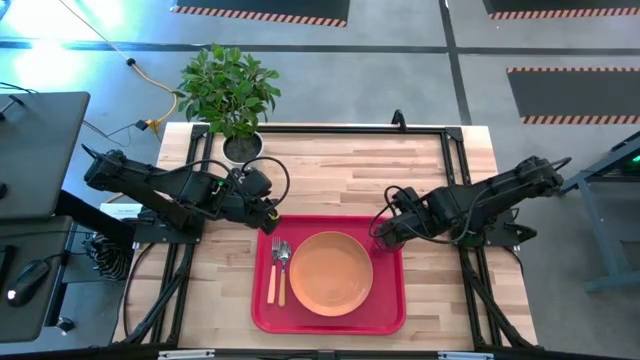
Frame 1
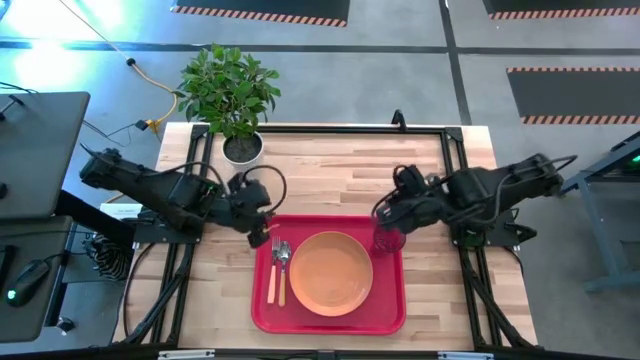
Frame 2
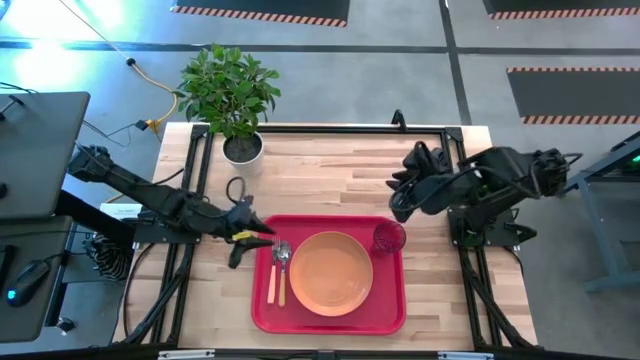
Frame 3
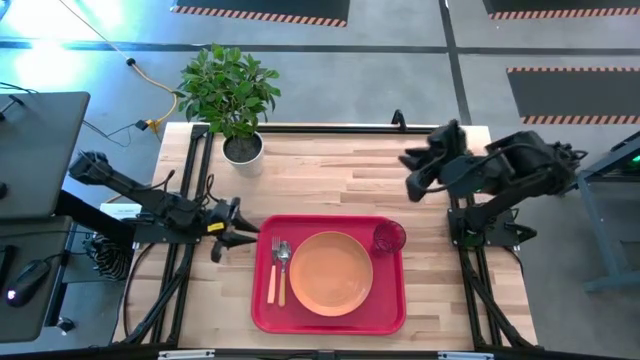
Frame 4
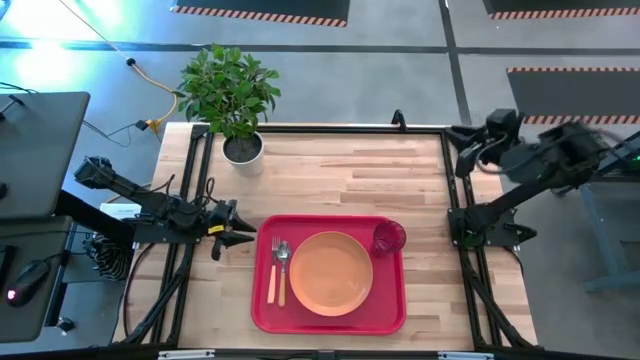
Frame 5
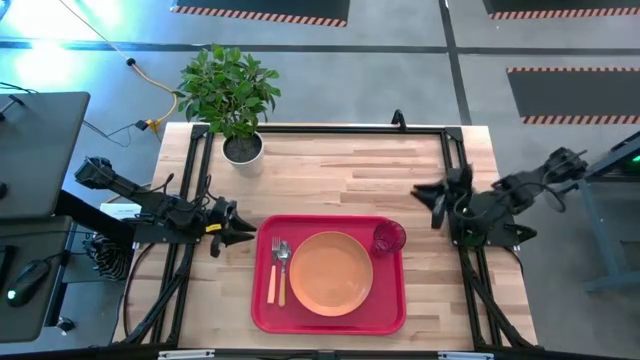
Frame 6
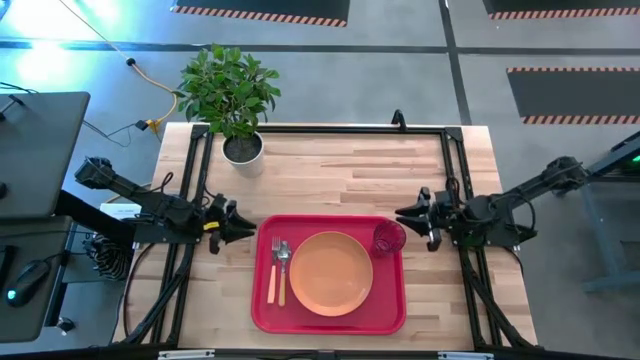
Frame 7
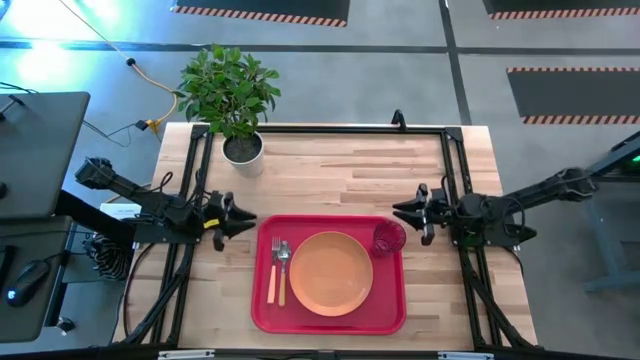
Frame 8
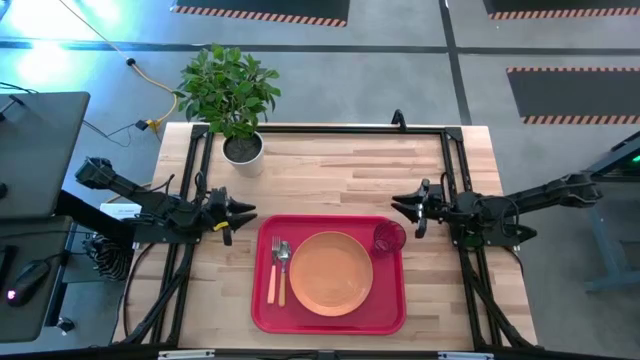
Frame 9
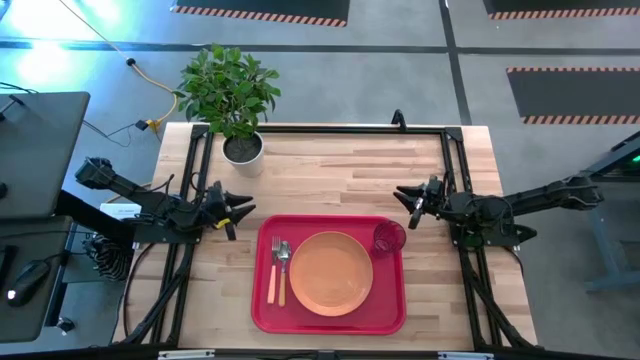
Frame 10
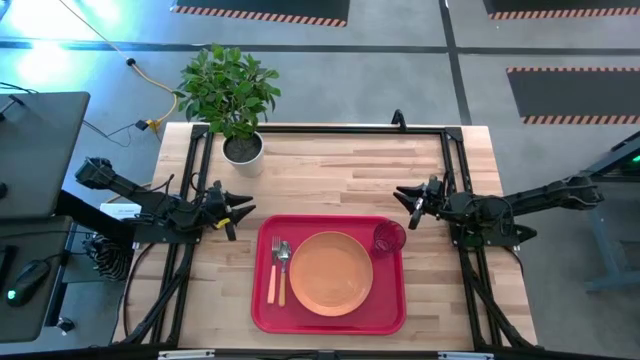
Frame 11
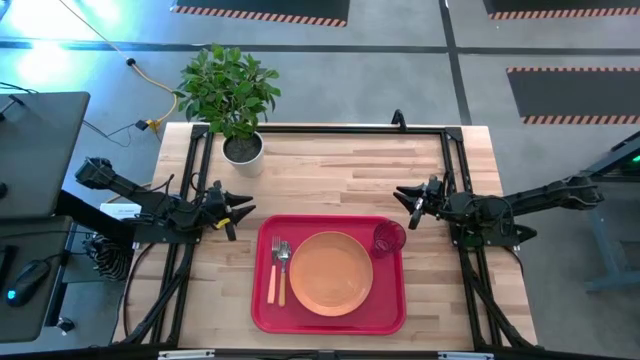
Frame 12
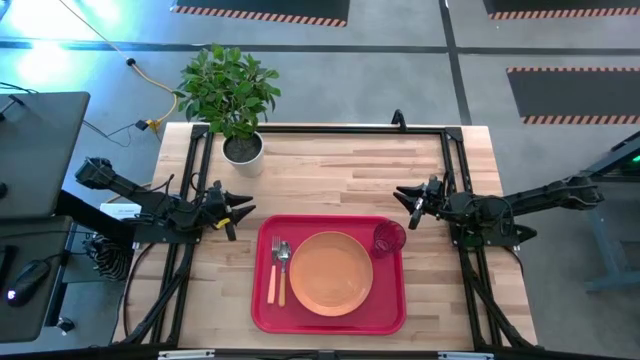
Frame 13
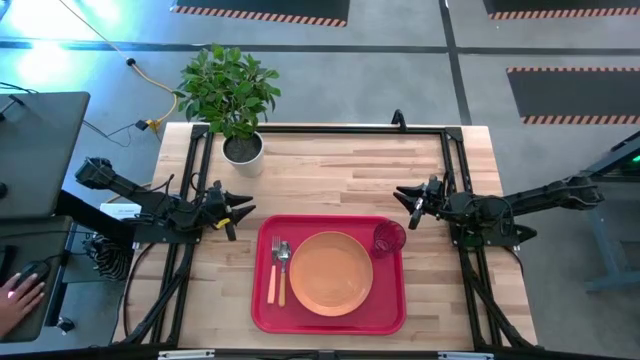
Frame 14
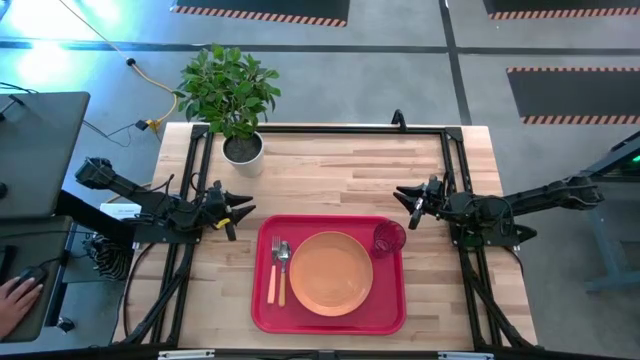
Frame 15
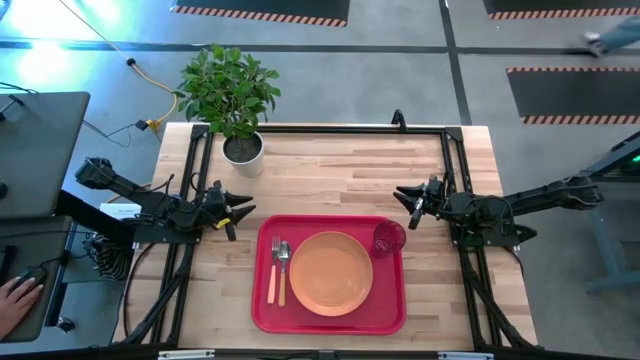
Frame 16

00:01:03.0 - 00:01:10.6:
Task: Pick and place plate/cup/fork/spoon on tray
Return to Home Position

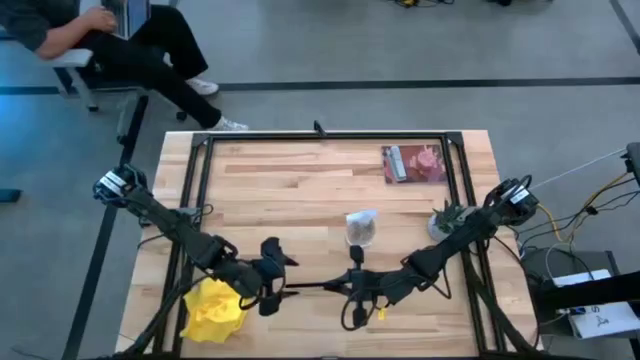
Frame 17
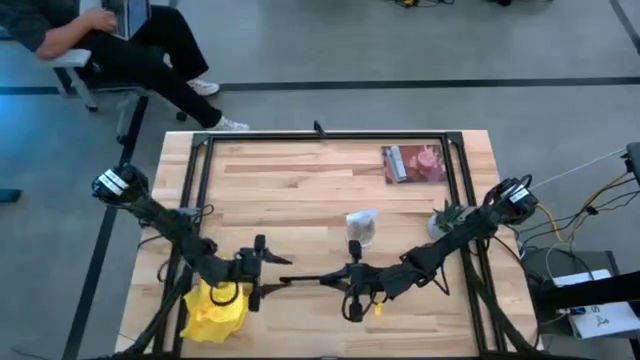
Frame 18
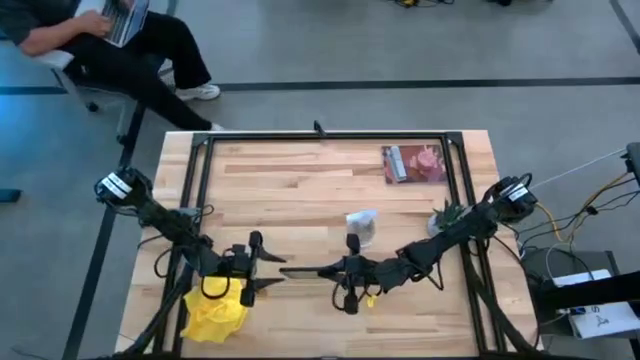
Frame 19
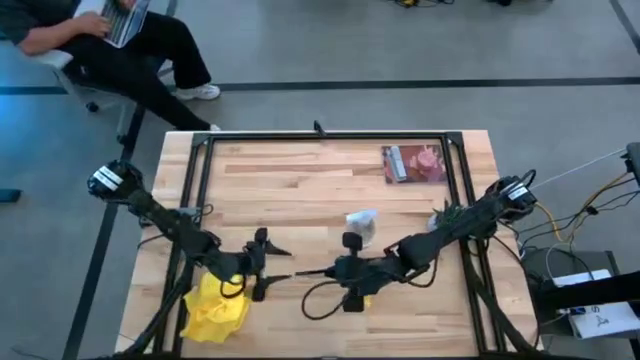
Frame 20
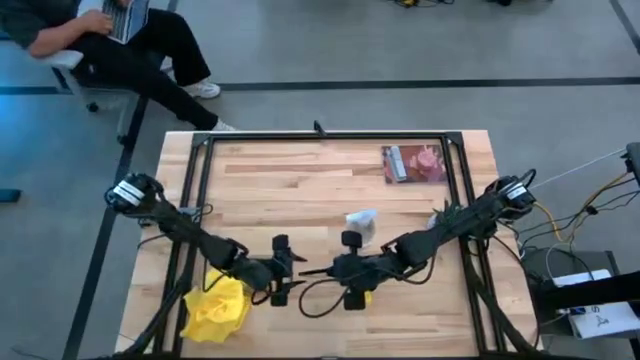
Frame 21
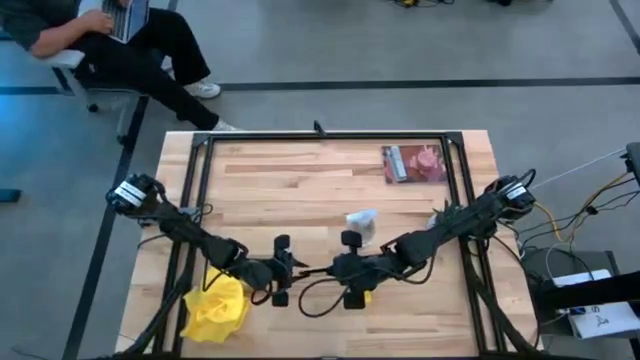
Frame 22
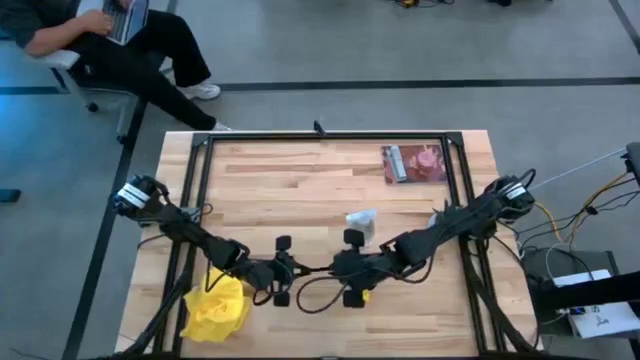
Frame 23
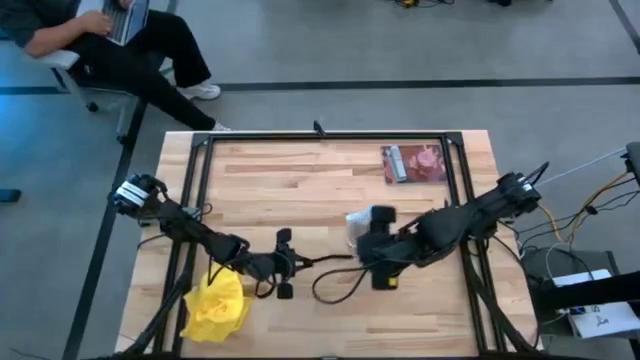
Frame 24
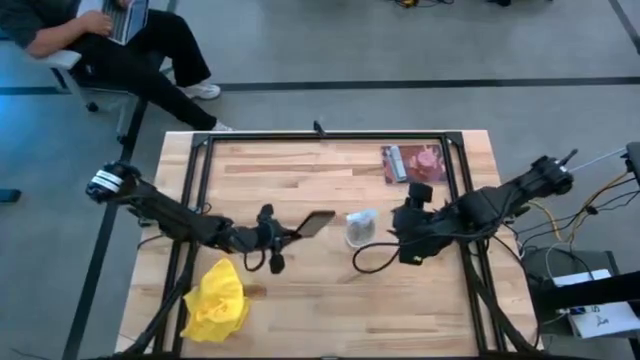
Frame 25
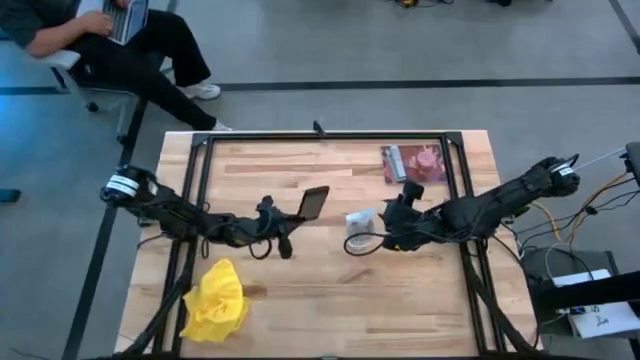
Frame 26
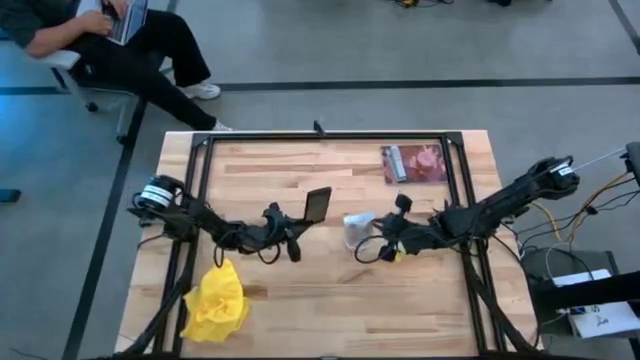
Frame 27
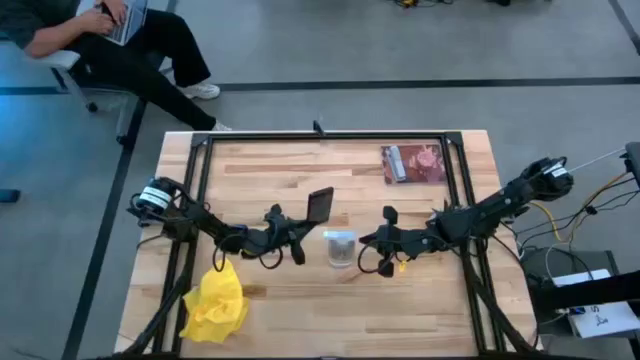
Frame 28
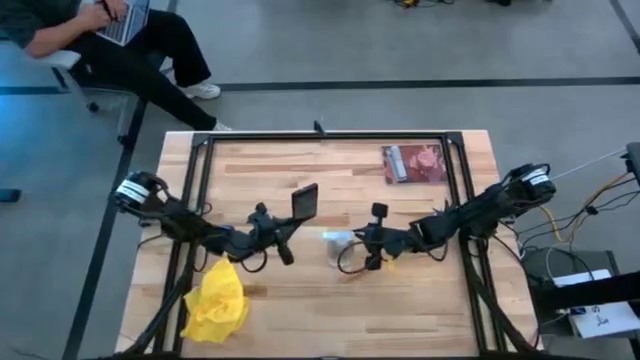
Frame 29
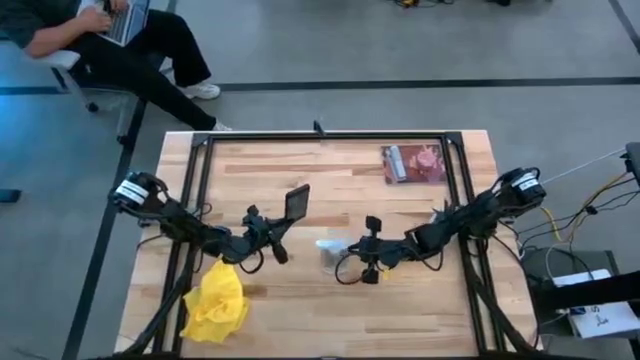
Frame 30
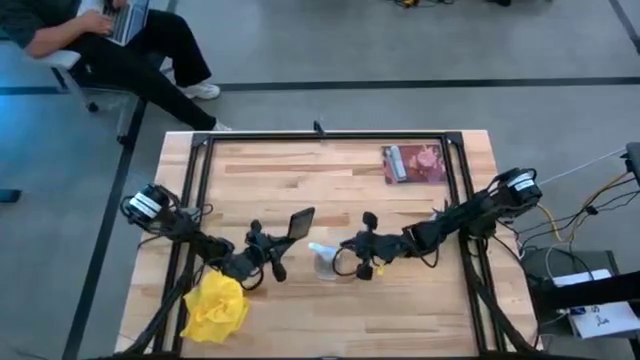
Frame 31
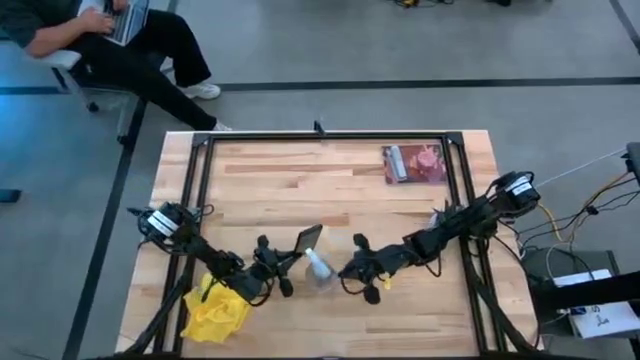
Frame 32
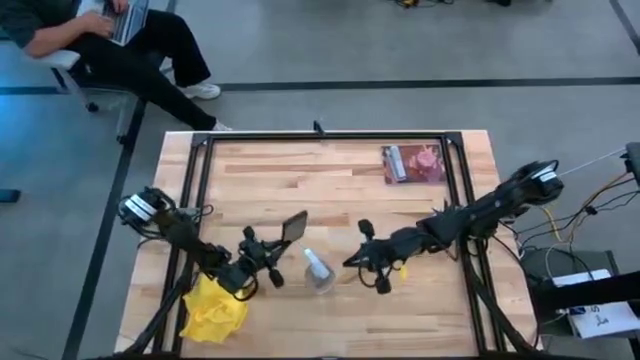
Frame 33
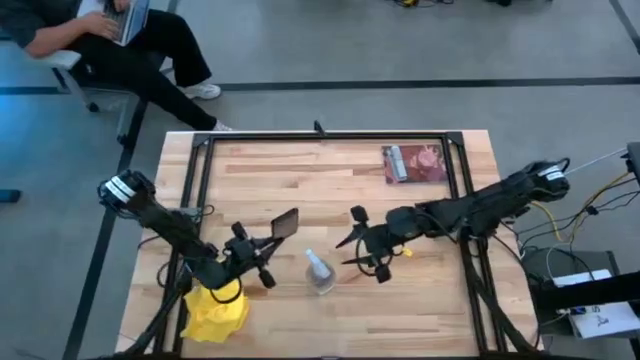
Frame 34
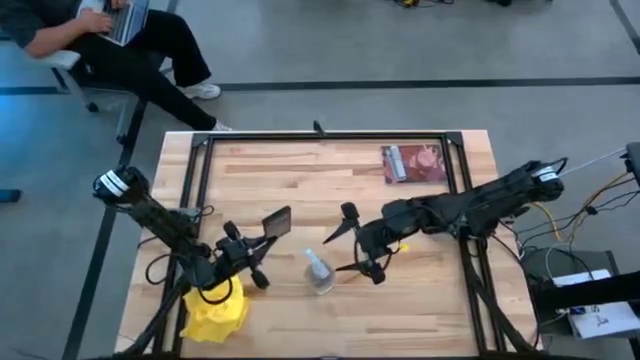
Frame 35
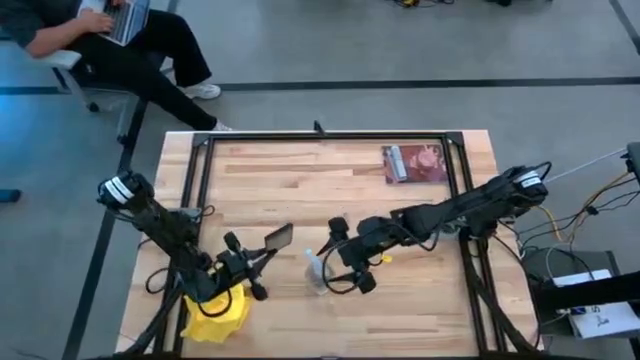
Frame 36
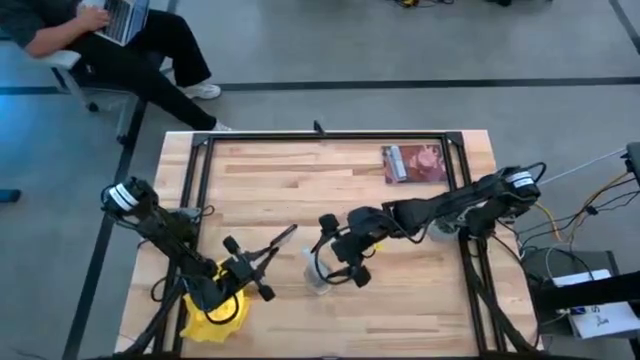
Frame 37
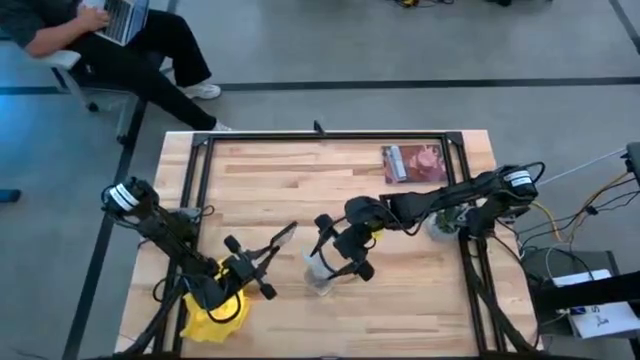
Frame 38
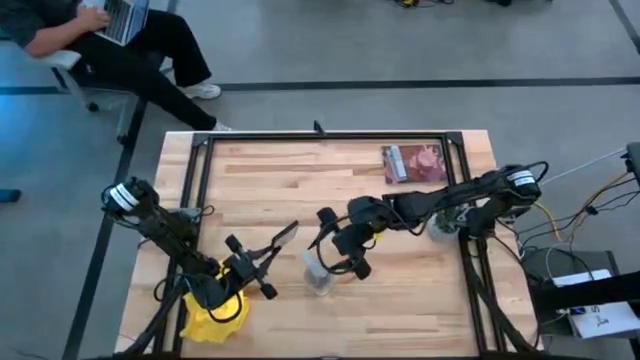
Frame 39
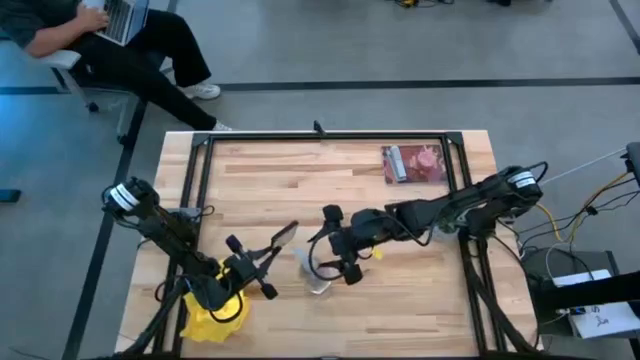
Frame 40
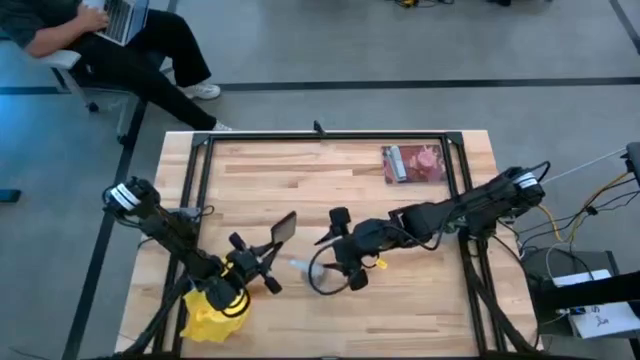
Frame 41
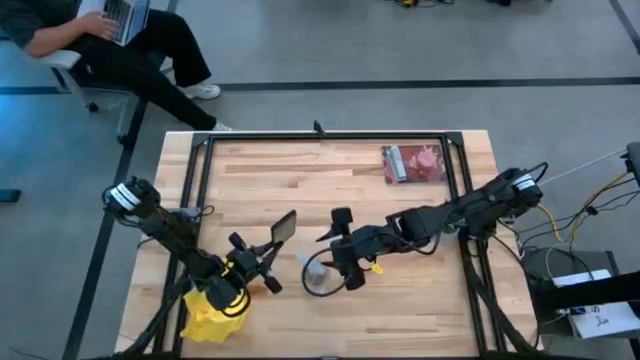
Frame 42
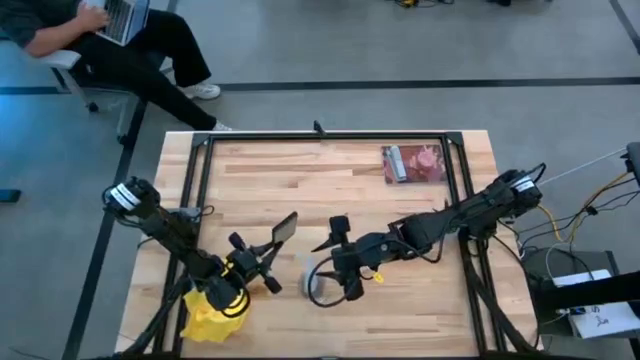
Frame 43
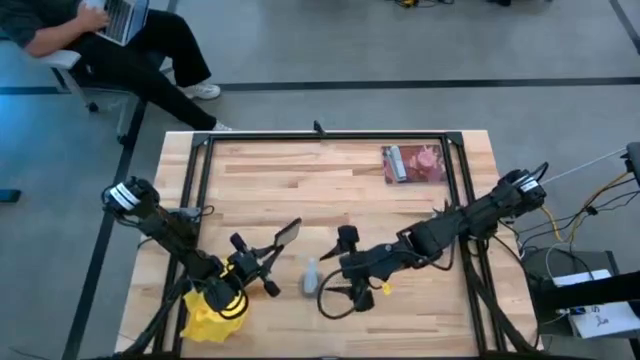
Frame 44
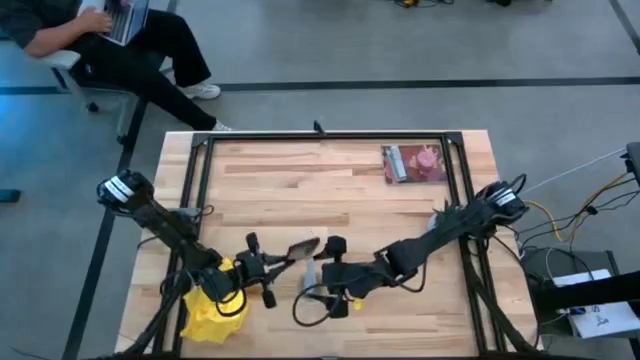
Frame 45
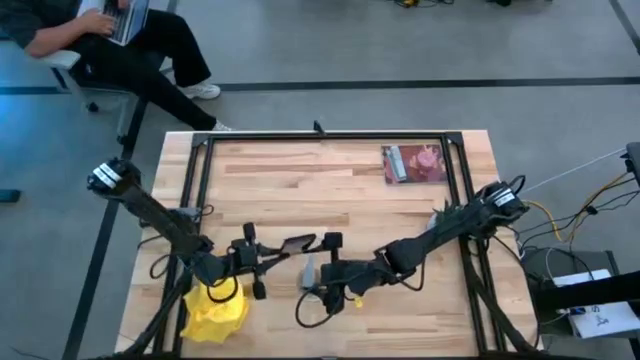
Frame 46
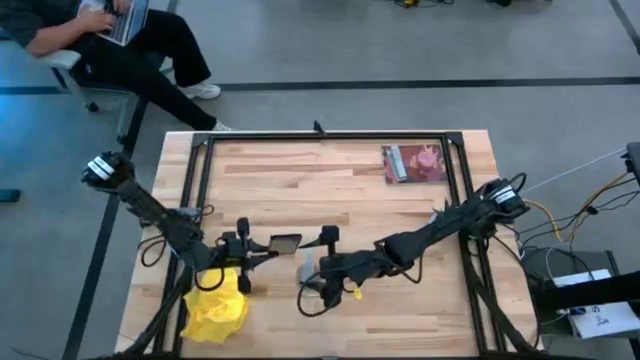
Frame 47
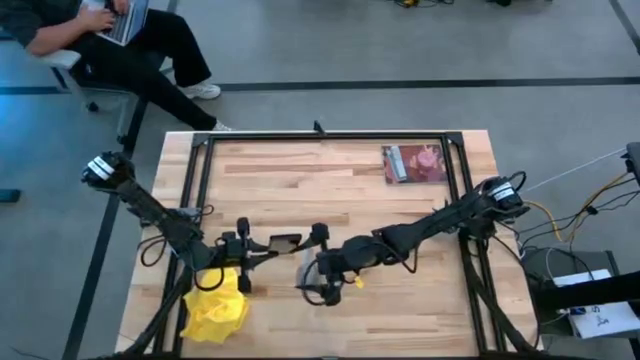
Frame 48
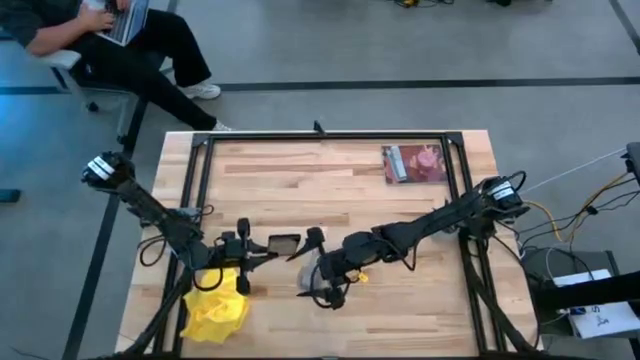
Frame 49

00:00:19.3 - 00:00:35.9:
Task: Apply microfiber cloth
Spray the black cellphone with the spray bottle
